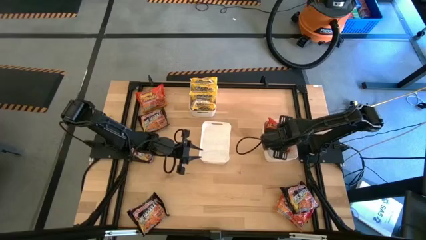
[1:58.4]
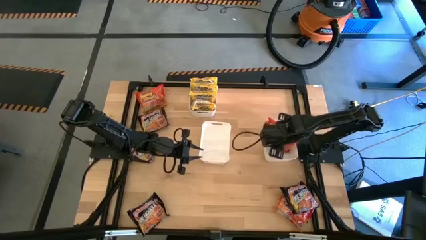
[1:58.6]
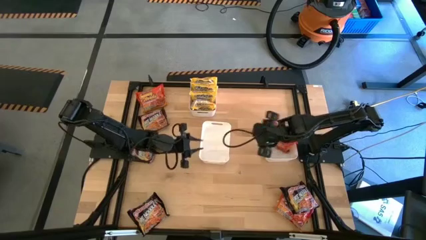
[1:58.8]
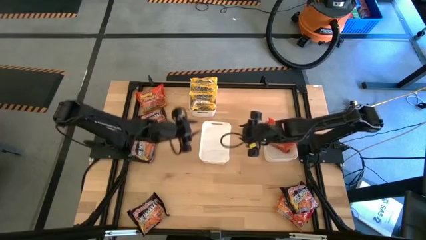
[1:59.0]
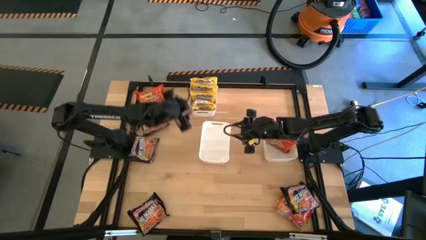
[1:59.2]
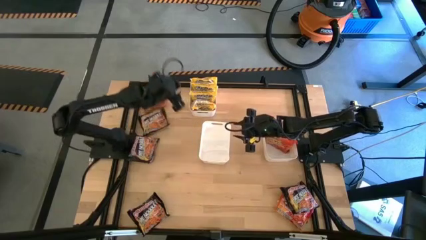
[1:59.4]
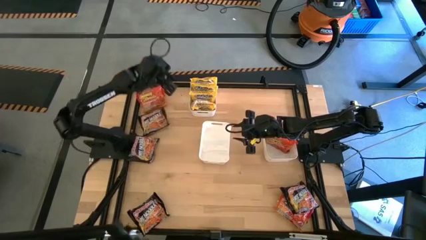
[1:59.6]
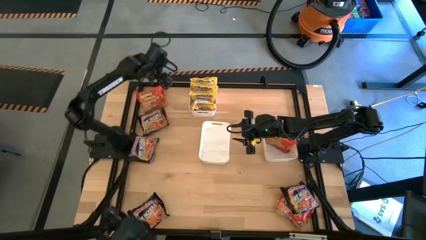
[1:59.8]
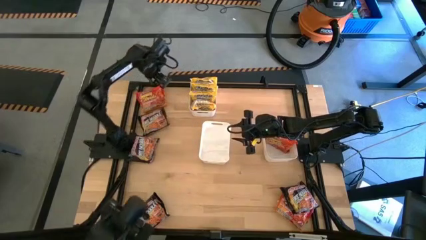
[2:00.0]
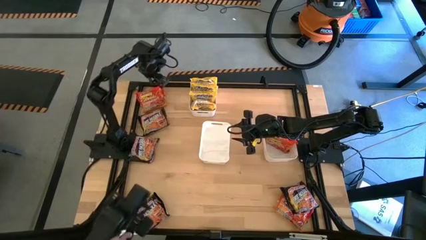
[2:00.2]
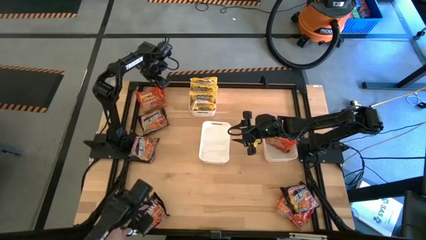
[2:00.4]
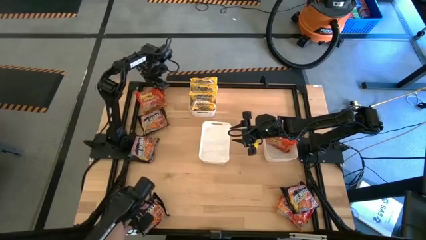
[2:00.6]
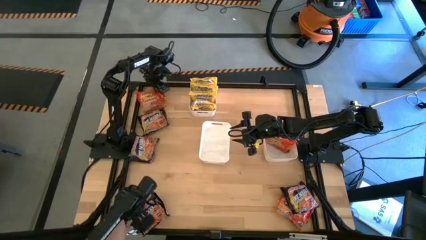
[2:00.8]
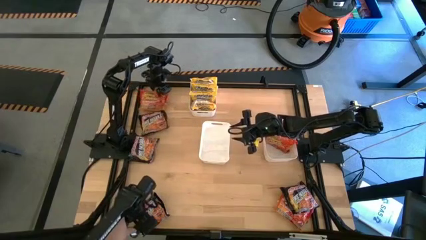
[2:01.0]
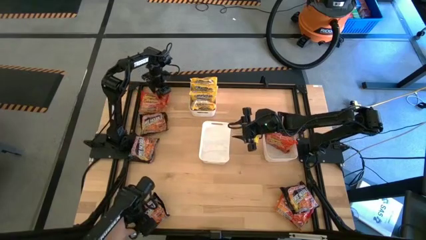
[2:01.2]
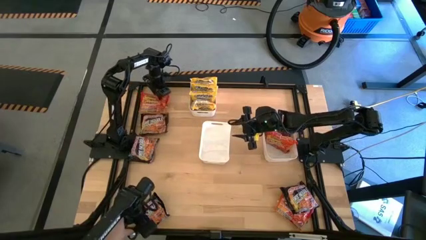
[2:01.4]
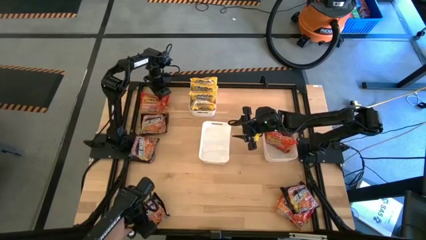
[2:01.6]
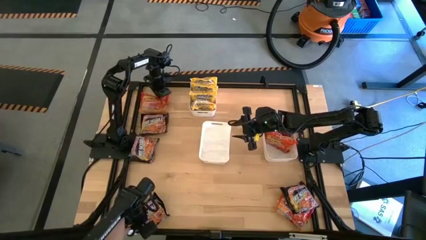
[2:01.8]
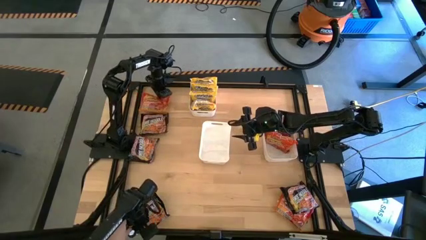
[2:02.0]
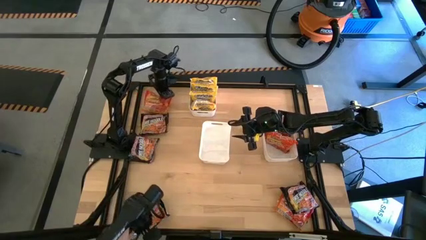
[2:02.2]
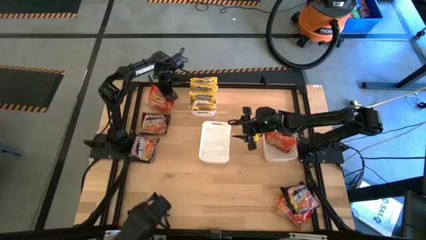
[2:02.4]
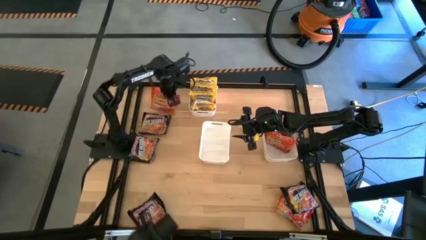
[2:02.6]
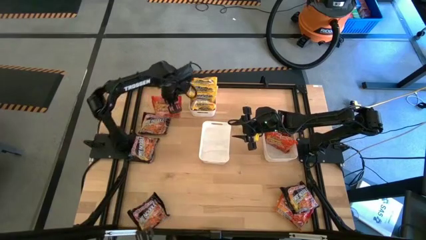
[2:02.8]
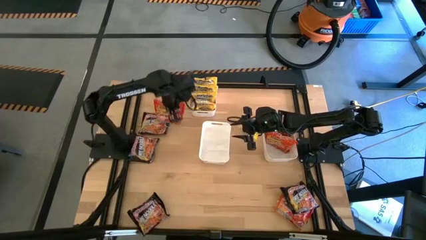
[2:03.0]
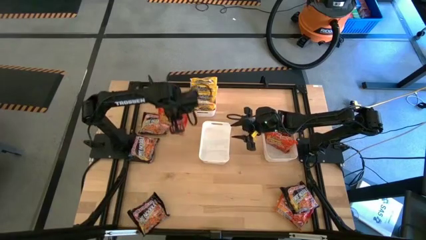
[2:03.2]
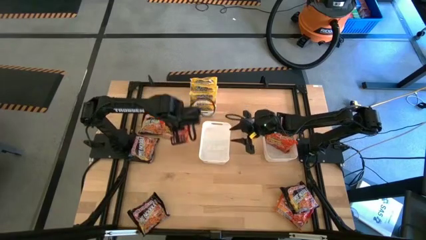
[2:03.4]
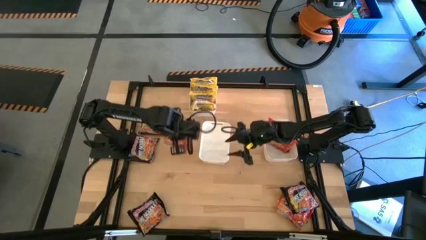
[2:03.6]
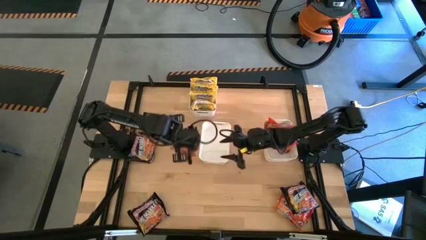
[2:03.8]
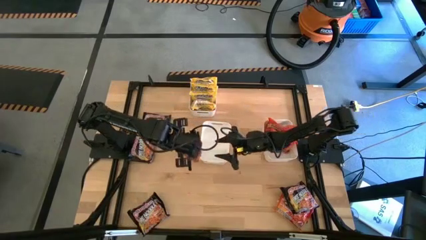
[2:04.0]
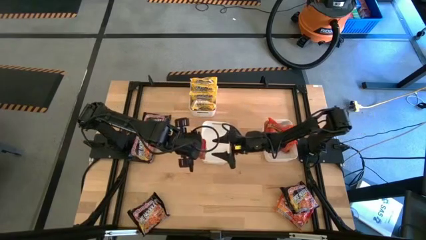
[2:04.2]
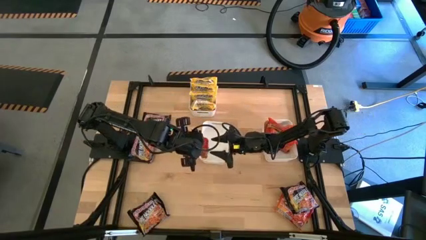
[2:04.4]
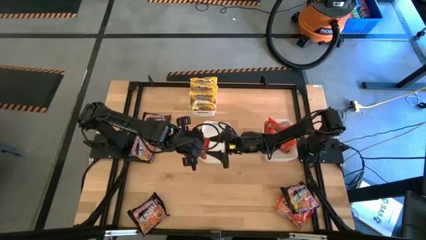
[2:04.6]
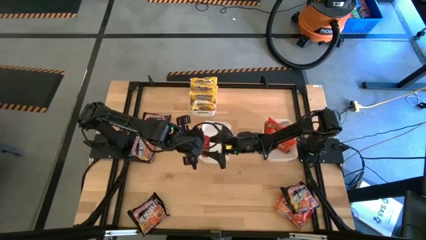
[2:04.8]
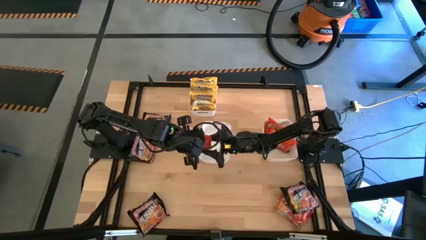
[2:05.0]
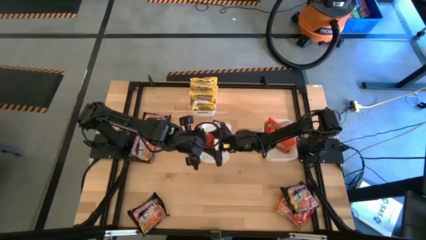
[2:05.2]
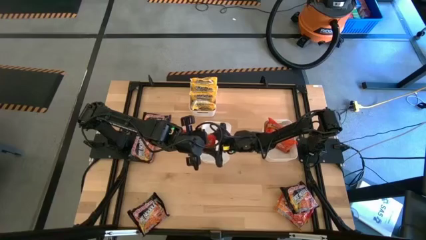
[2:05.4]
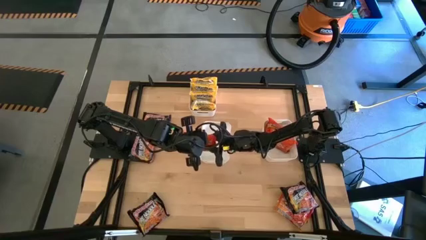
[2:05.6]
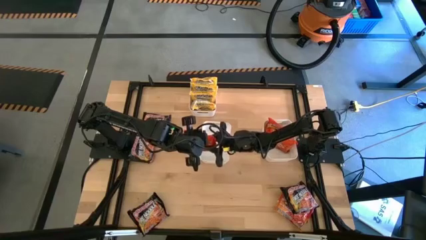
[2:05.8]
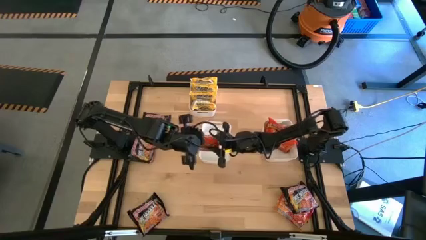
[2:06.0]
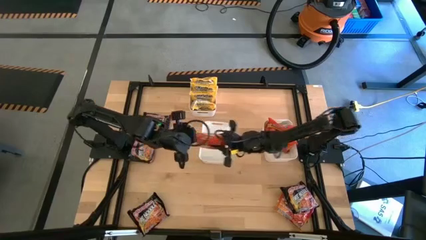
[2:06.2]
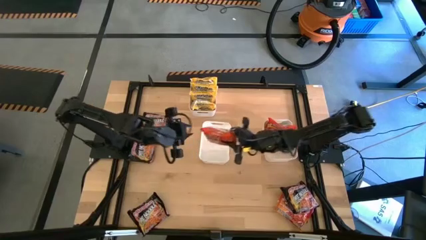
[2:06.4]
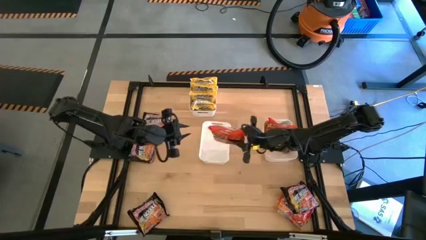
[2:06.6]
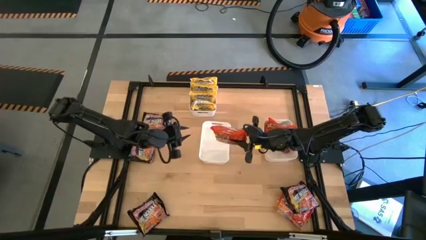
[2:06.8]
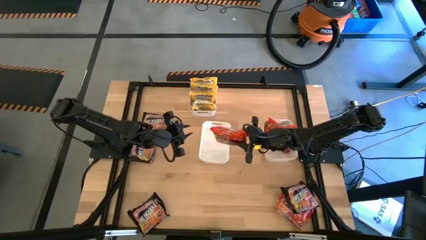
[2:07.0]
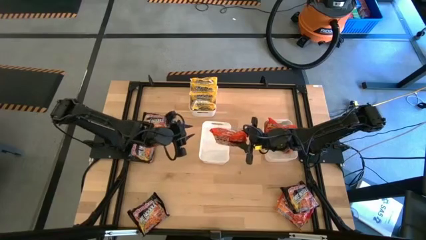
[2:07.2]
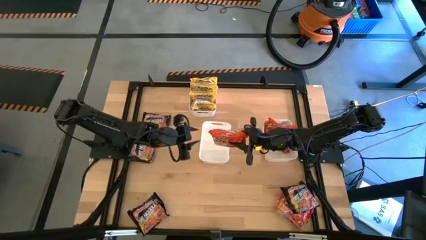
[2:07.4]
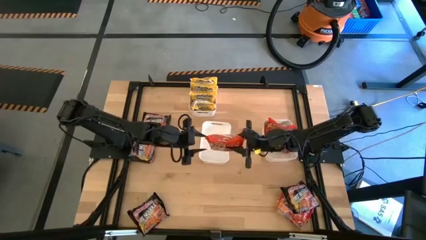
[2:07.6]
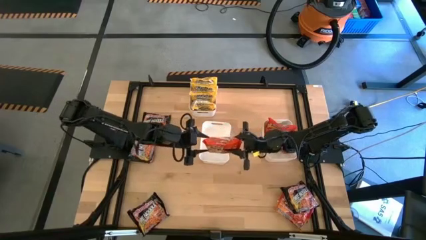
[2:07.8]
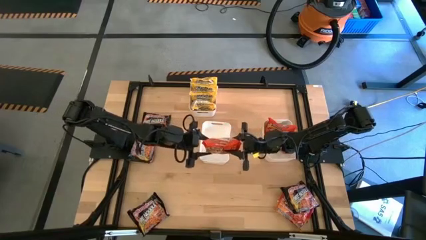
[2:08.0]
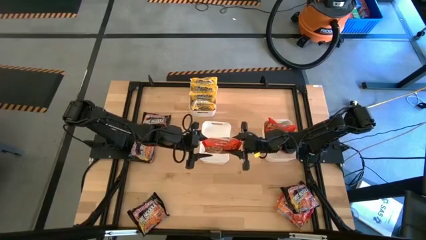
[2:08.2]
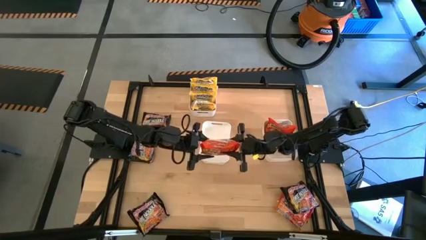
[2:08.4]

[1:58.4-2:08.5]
Task: Sort Maruchan noodles
Put the orange noodle pack into the bottom right white bin
